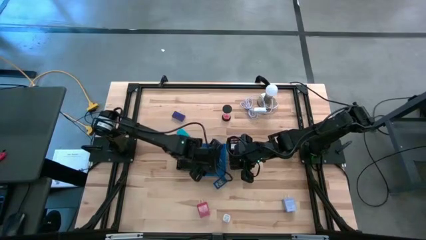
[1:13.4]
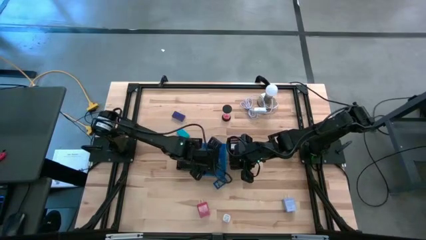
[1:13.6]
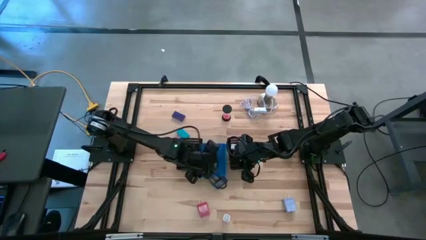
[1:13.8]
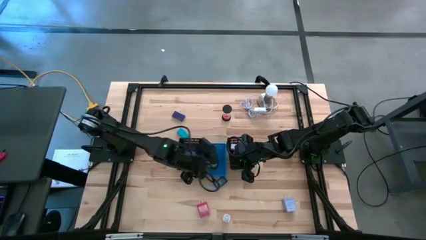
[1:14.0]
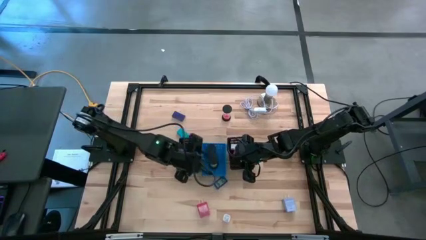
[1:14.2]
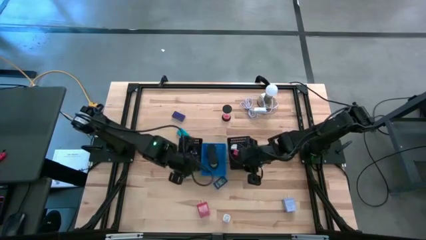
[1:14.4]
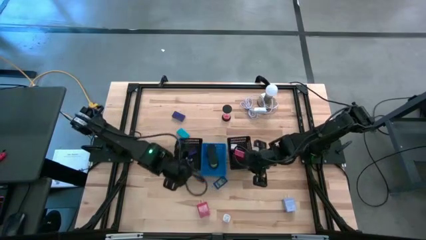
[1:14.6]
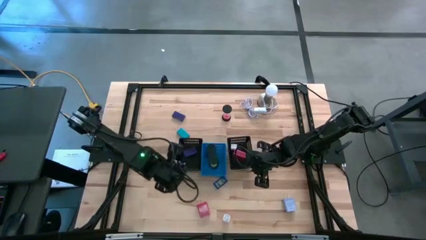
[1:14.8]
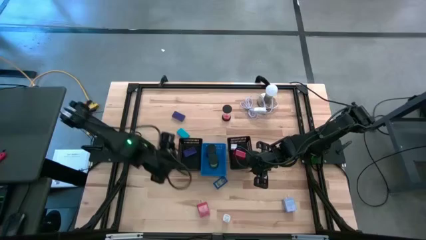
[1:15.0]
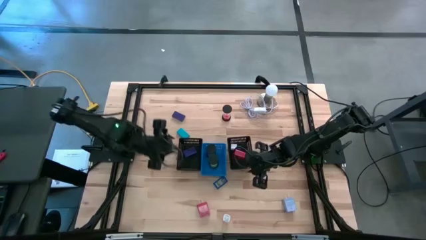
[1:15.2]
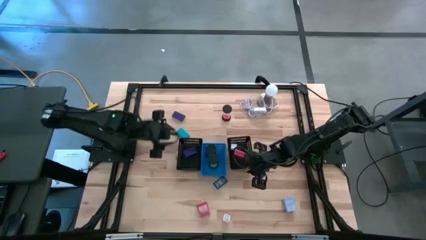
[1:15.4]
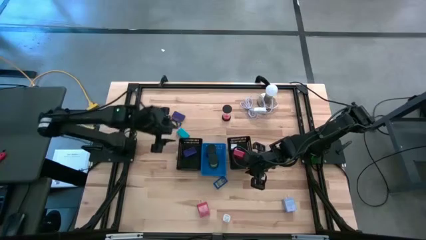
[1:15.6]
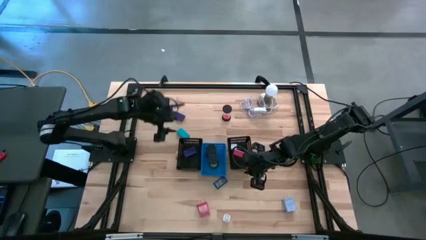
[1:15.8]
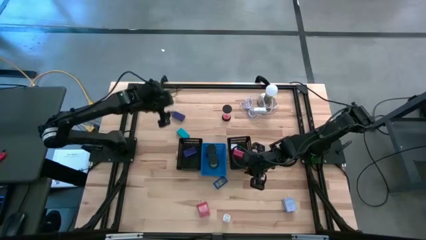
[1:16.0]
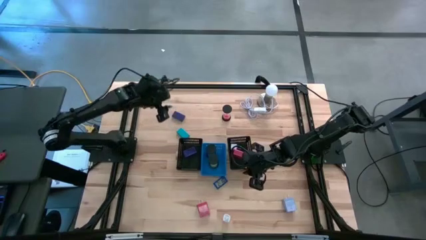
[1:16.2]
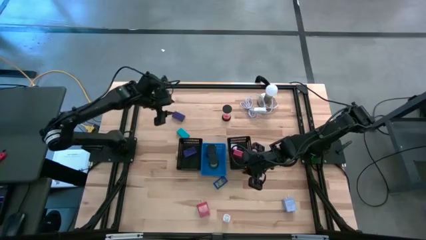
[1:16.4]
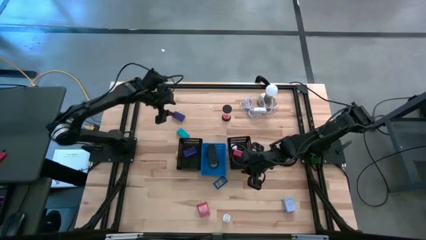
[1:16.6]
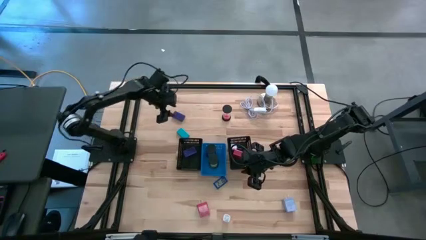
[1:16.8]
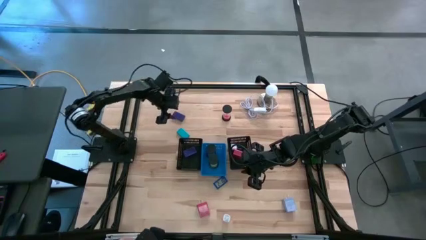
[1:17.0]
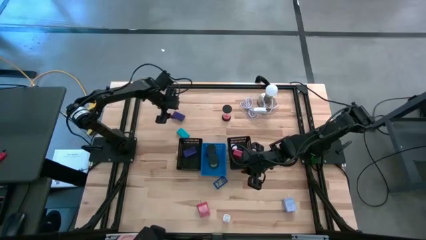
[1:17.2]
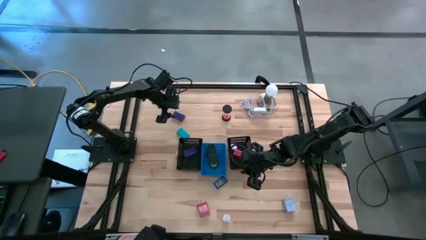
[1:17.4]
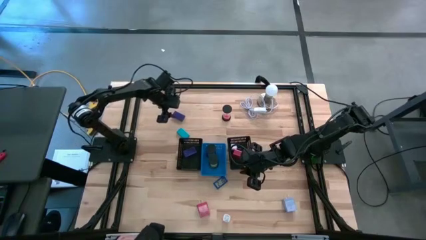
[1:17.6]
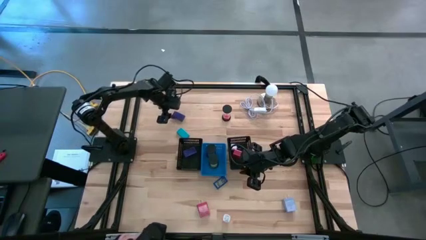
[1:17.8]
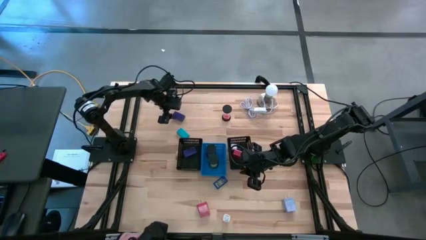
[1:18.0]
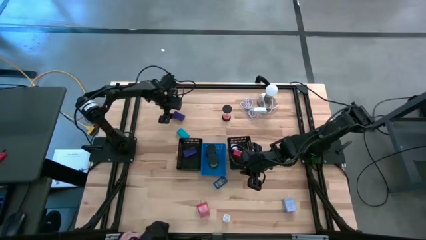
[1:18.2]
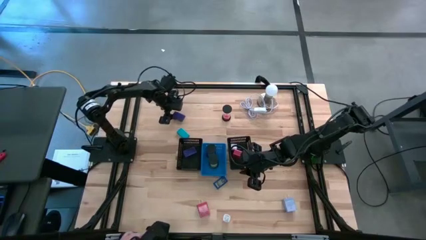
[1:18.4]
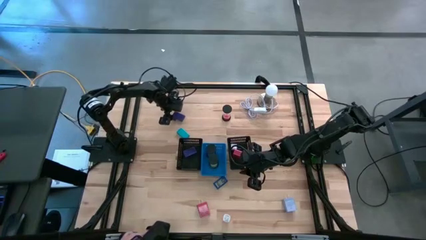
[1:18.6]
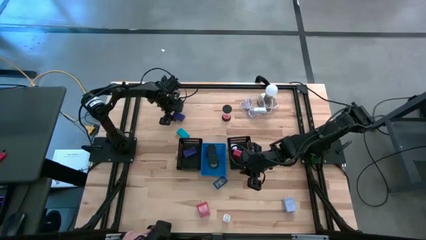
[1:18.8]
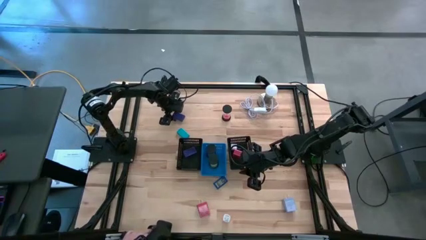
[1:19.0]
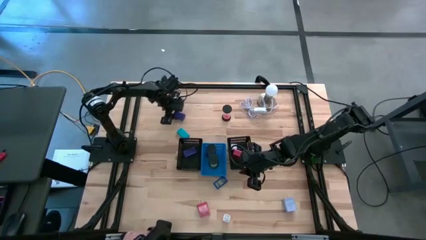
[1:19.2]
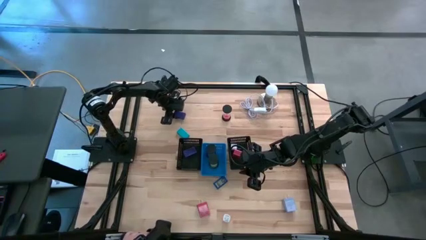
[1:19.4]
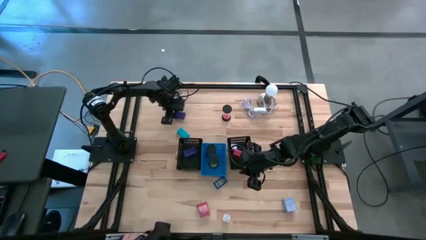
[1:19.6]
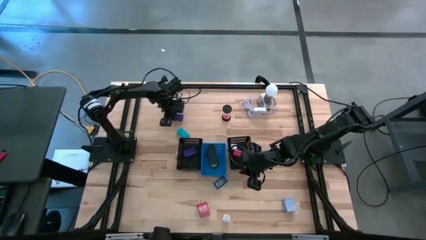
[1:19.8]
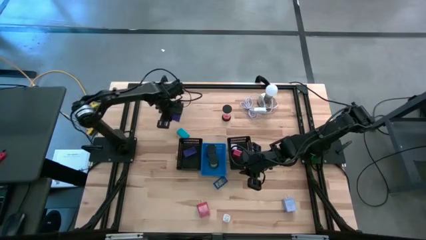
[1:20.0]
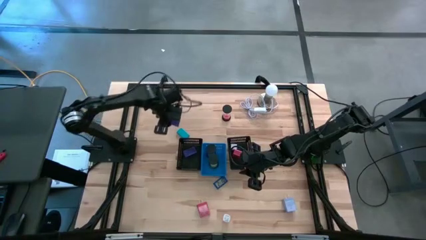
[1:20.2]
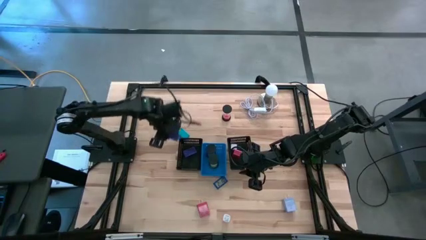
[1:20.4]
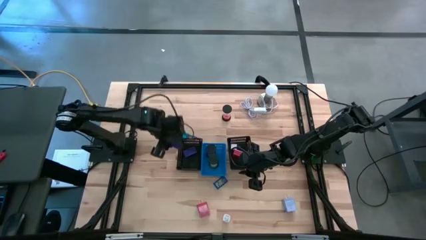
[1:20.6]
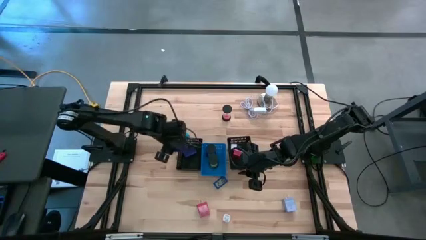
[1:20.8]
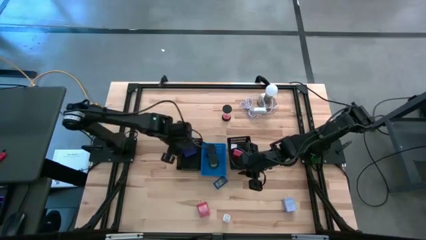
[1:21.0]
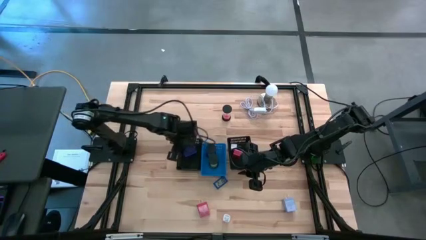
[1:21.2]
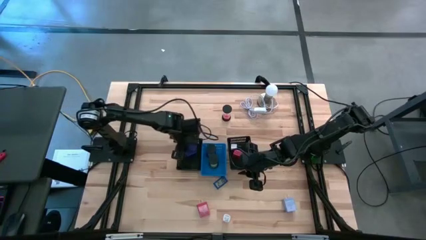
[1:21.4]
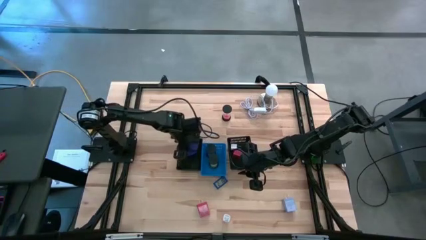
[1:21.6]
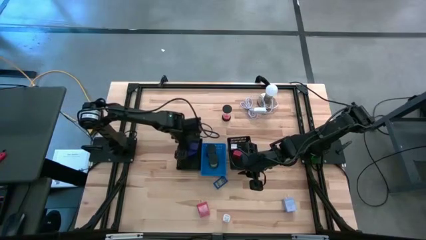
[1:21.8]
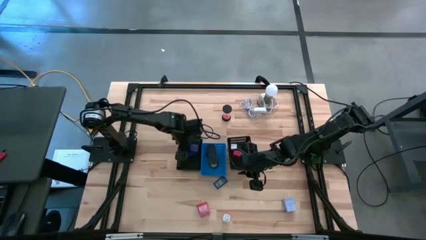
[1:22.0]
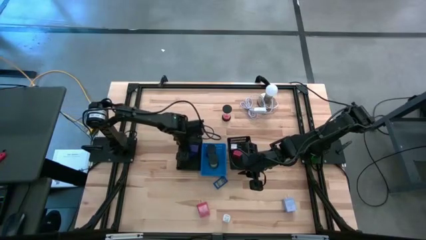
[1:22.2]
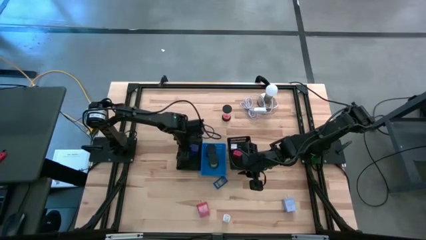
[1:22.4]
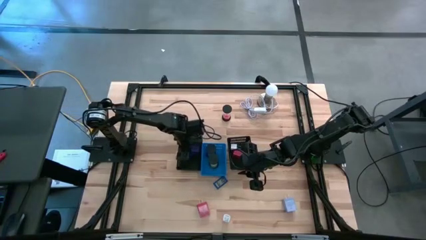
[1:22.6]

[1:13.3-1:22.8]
Task: Pick & Place Office items
Put the top violet digital clock into the left black bin

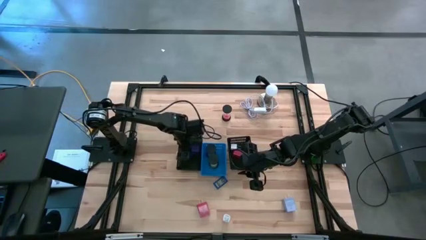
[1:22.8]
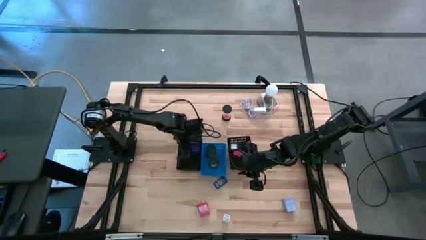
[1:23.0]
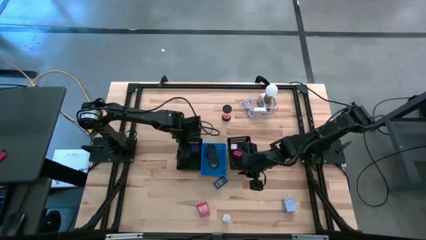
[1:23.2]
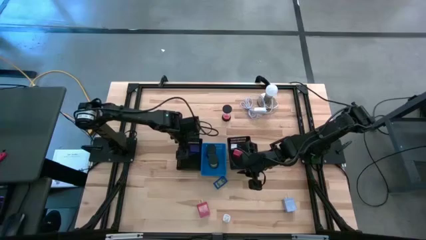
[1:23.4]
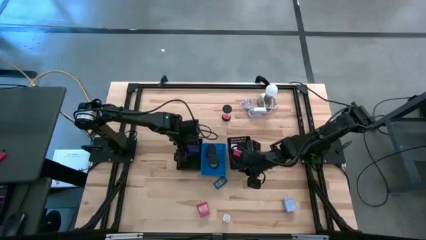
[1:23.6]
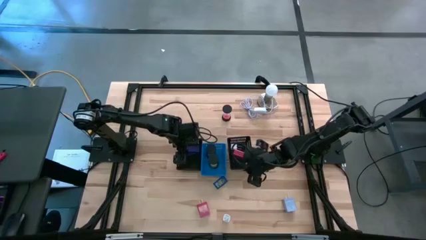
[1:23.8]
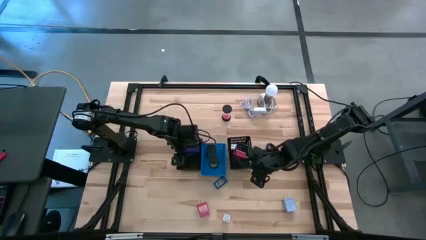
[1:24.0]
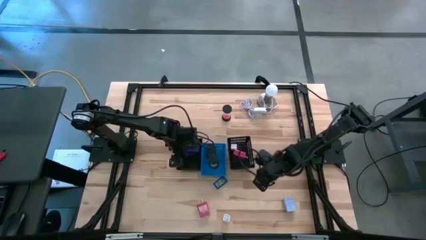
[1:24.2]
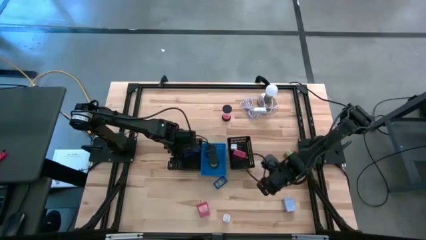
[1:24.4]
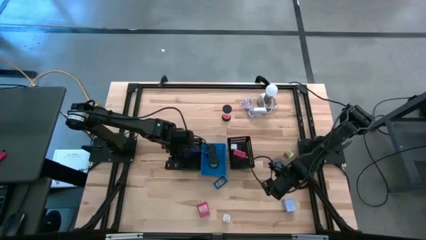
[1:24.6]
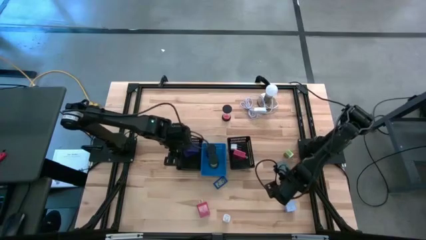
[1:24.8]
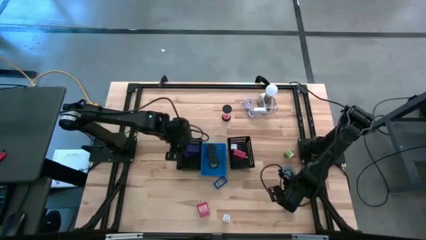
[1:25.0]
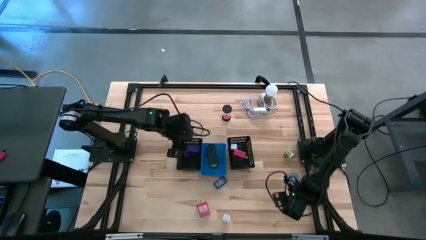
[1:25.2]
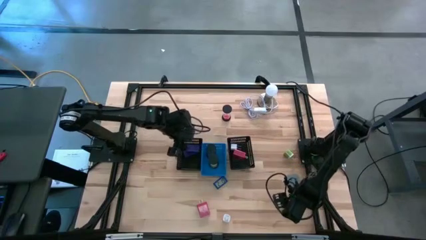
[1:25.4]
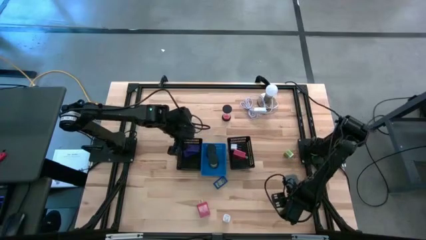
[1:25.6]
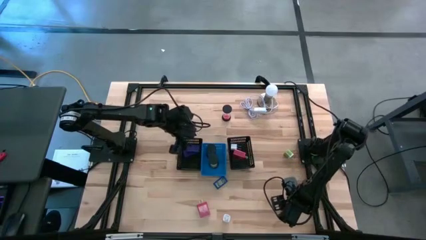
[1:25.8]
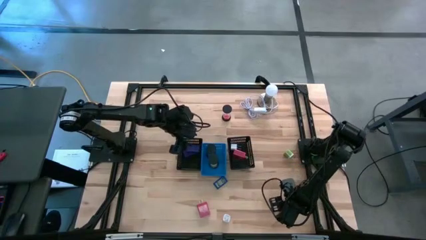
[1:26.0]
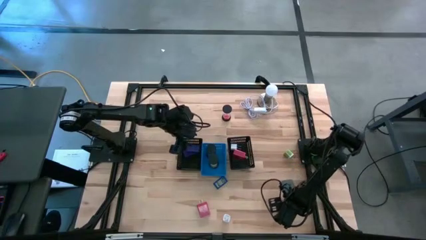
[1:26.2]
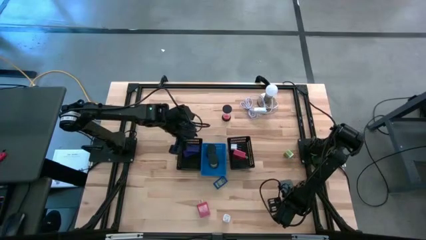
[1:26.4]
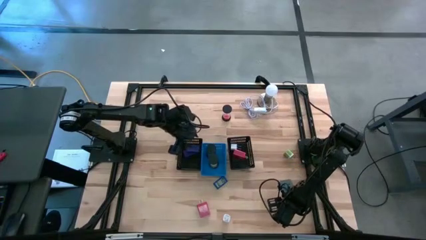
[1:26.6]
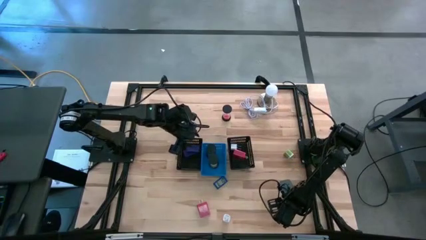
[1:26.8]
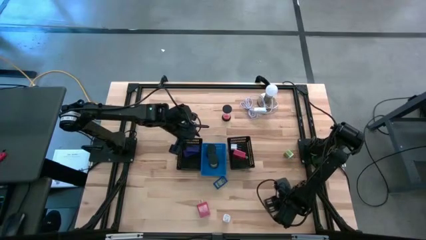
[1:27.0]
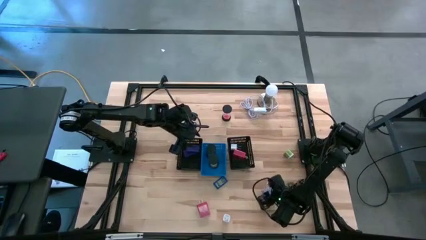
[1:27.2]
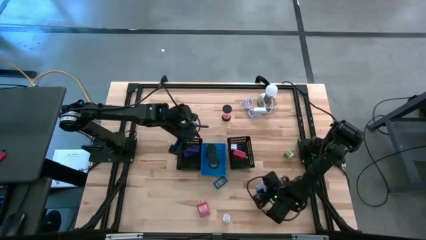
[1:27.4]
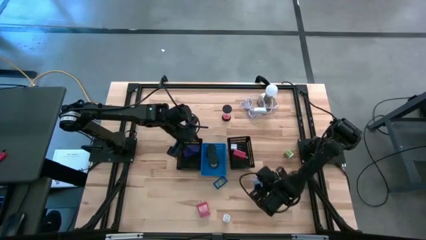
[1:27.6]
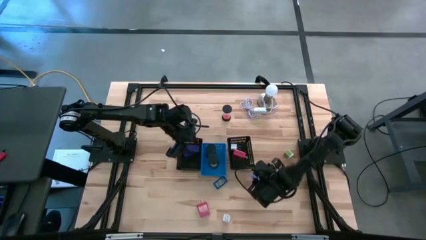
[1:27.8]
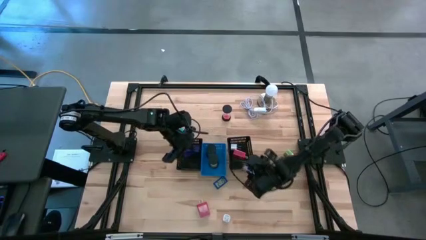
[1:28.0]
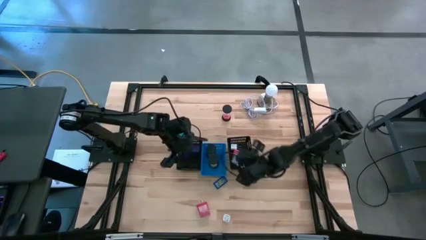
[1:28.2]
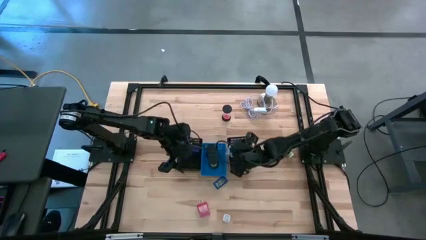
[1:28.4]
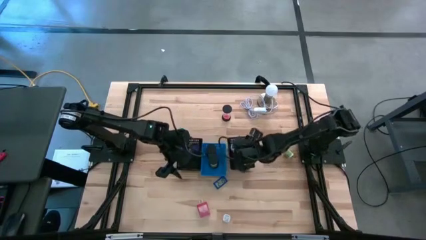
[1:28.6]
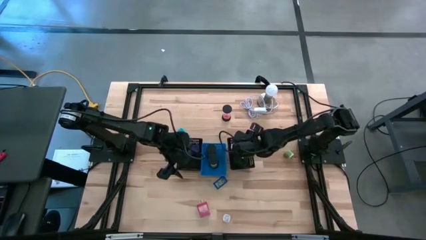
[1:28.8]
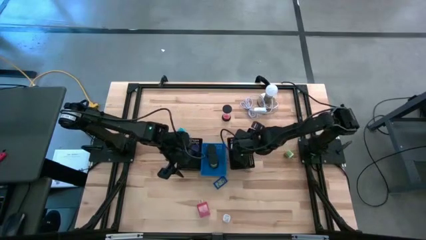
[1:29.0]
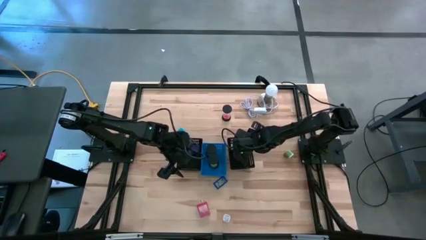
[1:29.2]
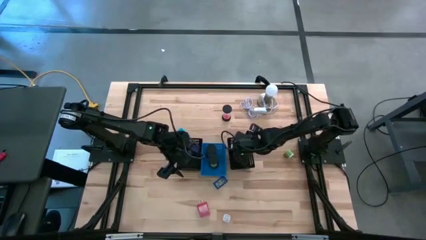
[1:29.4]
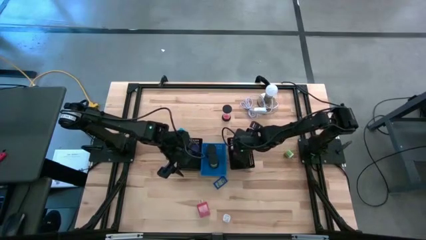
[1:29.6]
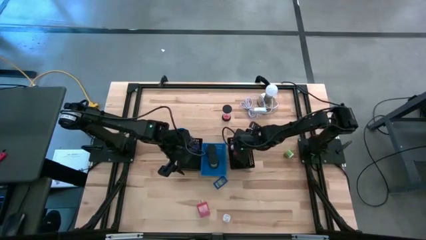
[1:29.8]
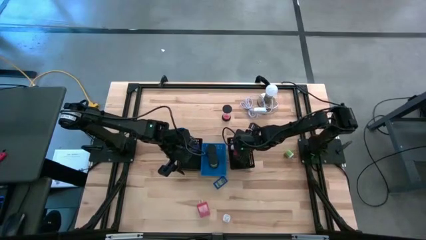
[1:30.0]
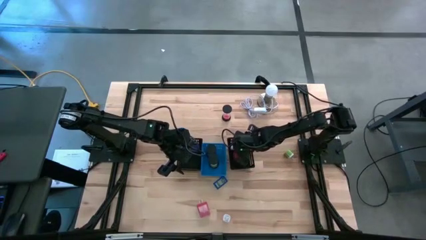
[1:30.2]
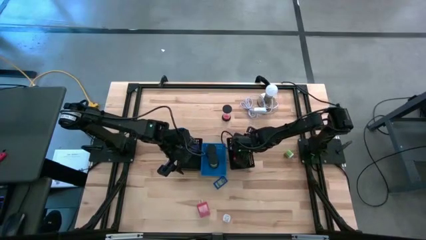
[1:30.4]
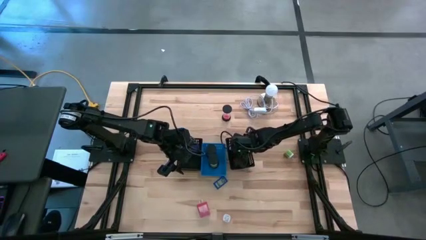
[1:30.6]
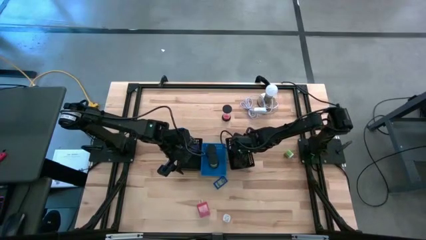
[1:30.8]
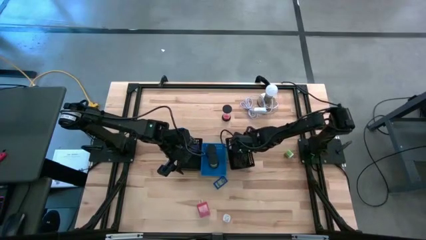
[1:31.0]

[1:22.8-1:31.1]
Put the purple charger adapter into the right black bin
